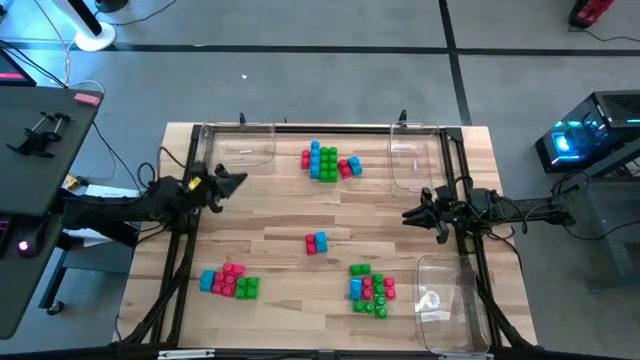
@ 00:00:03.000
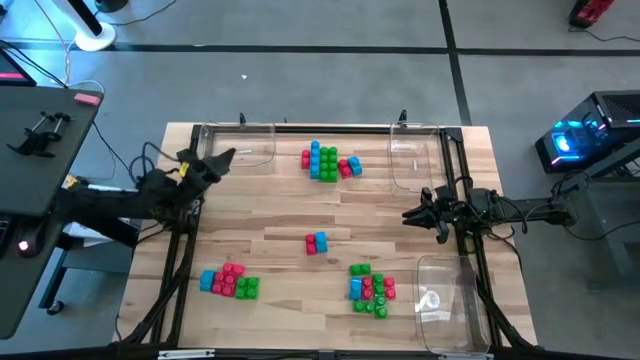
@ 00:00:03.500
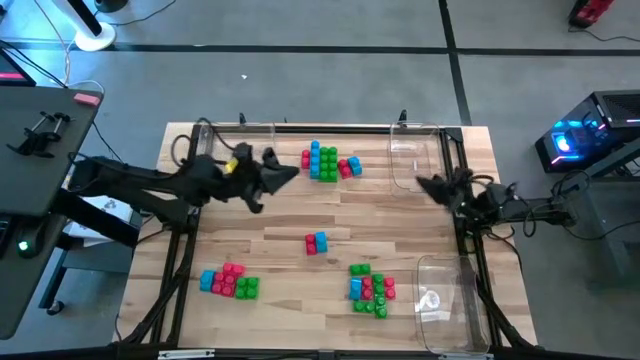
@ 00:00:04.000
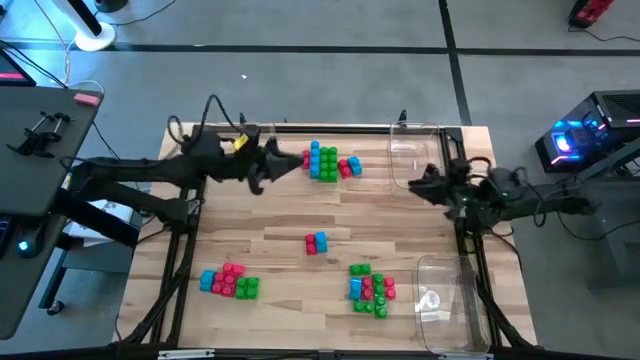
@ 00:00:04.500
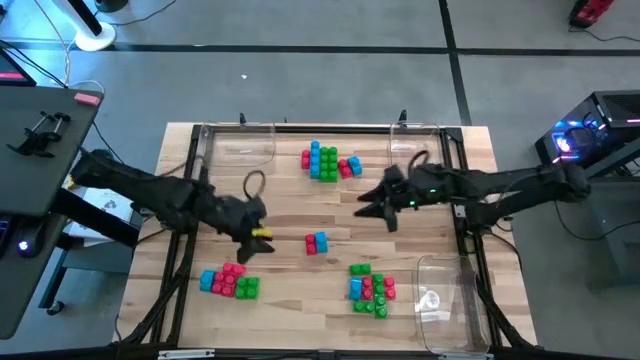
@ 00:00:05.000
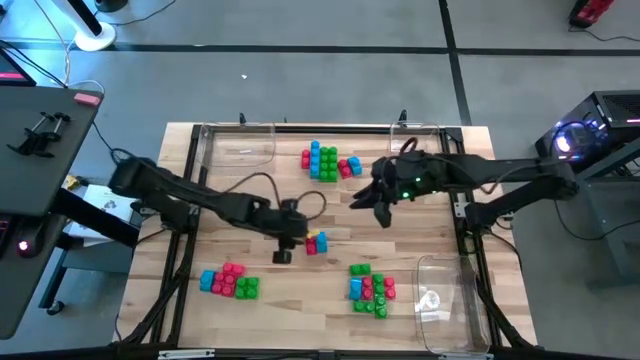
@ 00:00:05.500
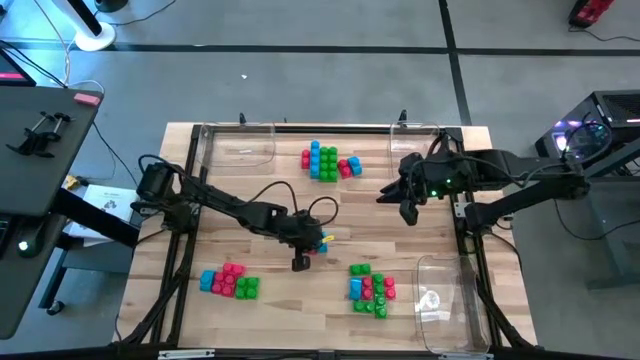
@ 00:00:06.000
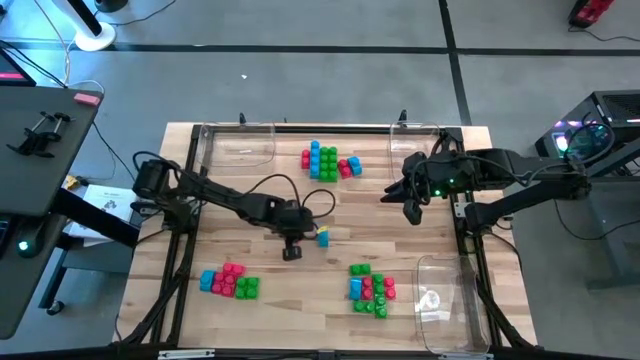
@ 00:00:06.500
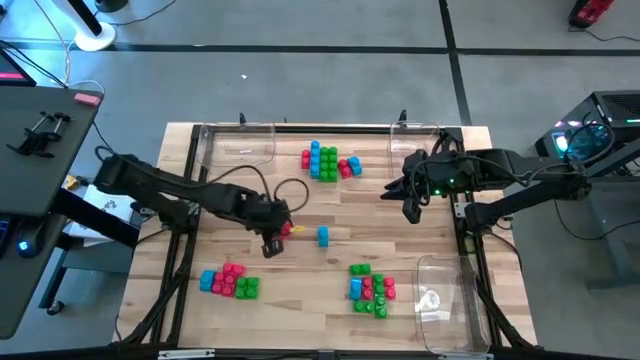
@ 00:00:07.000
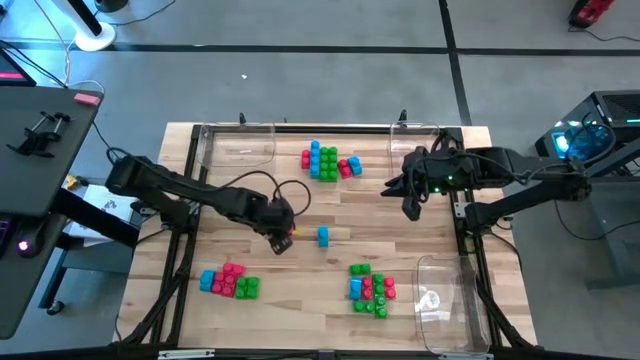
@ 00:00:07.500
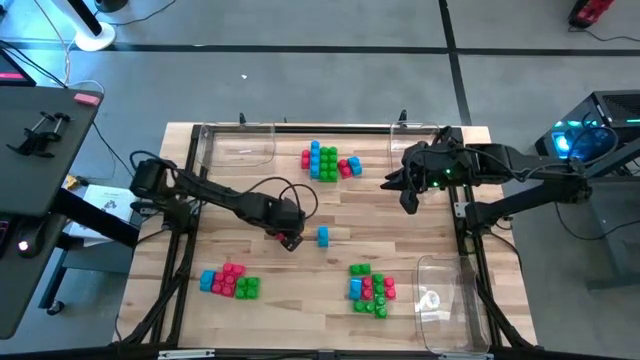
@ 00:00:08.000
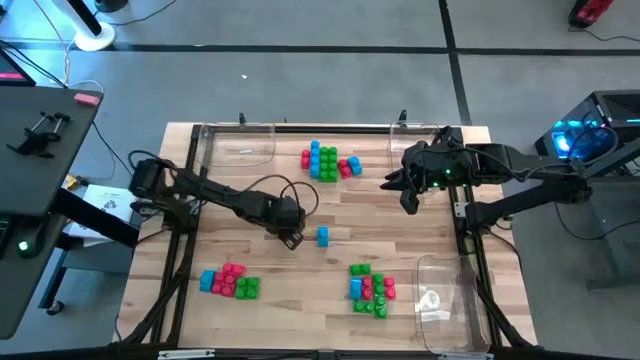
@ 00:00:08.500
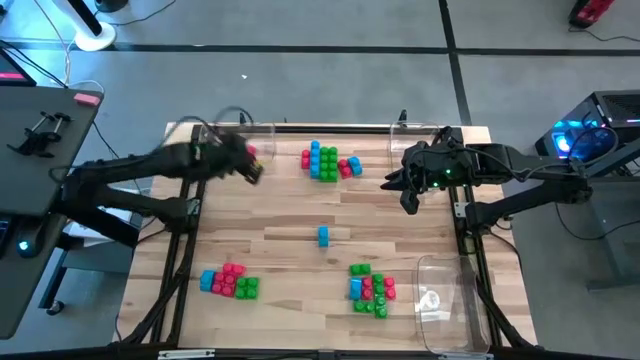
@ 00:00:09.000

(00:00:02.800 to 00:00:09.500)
Task: Sort blocks
Put the red game piece into the top left transparent bin

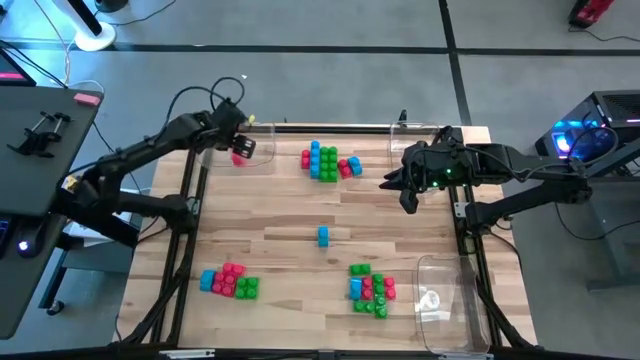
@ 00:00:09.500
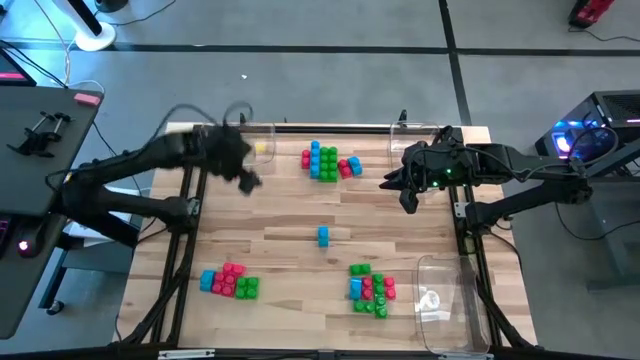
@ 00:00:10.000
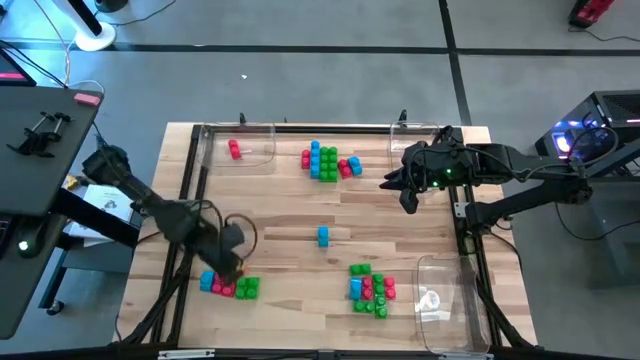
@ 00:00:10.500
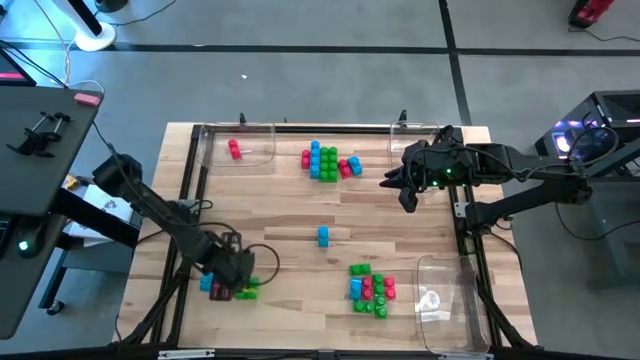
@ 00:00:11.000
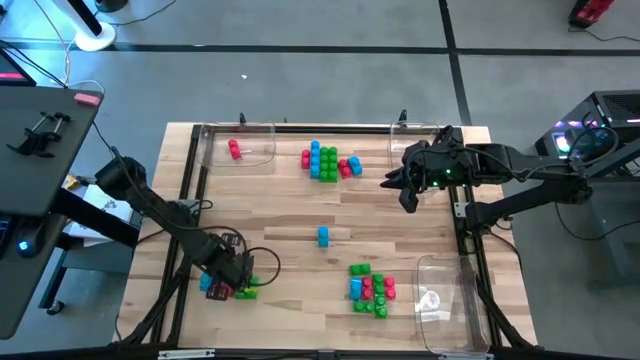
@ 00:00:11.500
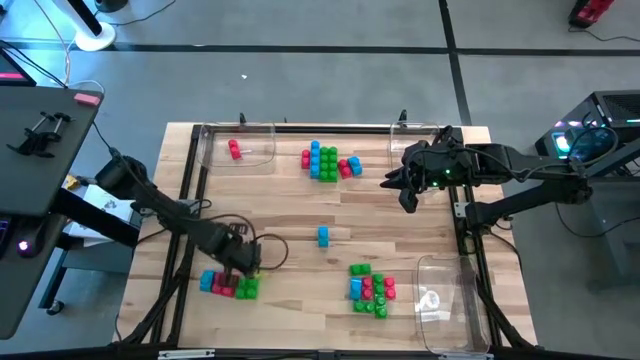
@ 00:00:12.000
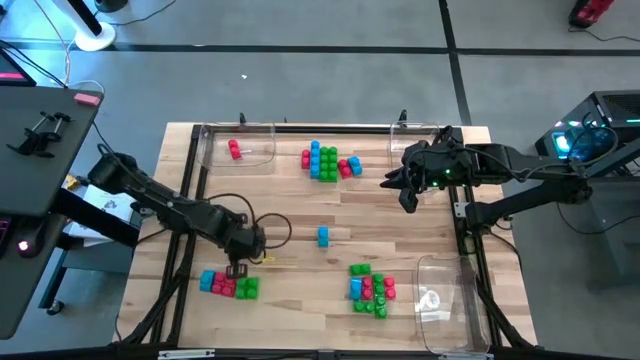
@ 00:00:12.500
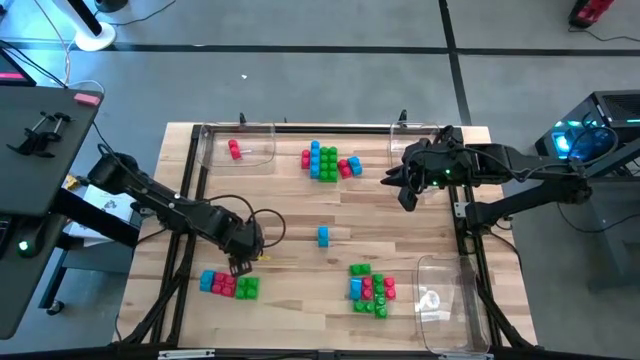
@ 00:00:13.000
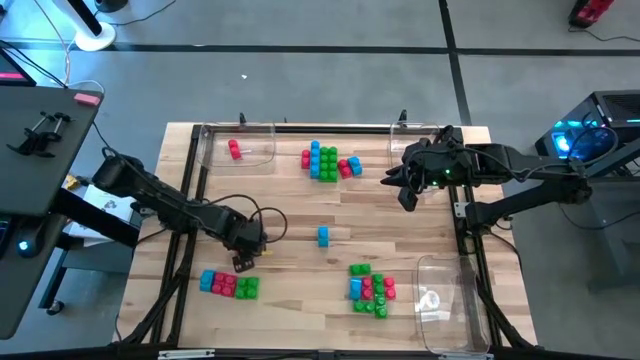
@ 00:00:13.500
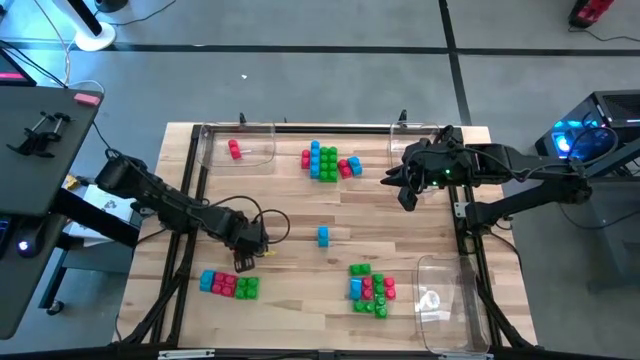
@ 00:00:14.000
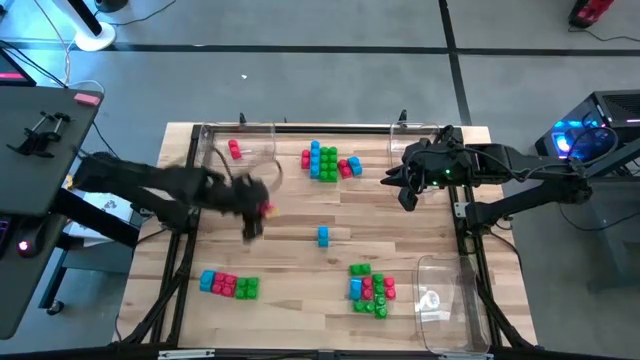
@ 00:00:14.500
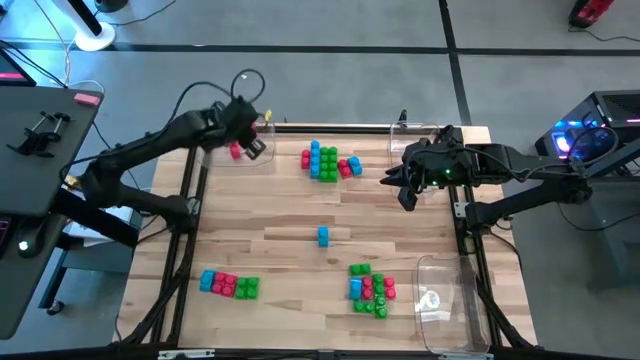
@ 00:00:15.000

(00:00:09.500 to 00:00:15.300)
Put the red game piece into the top left transparent bin

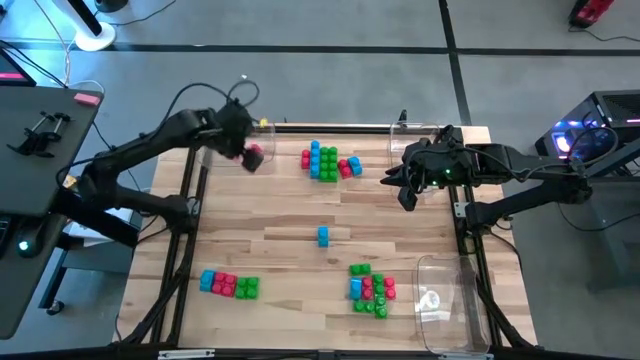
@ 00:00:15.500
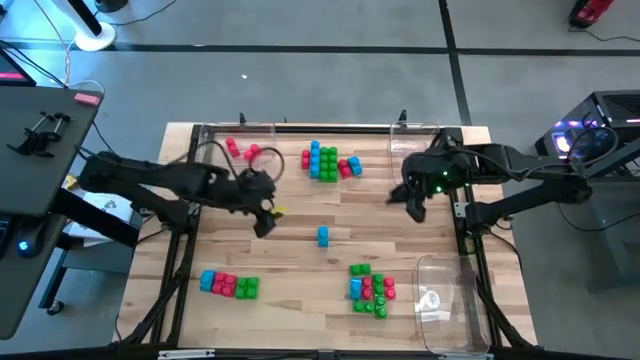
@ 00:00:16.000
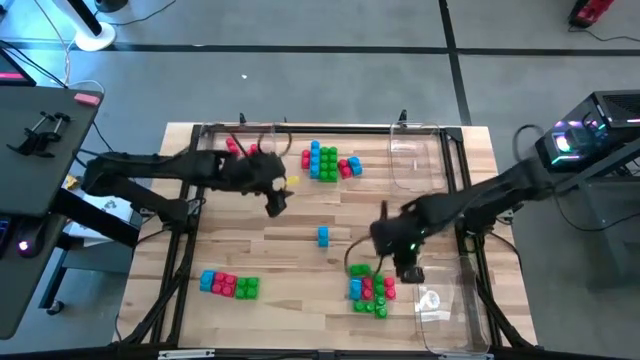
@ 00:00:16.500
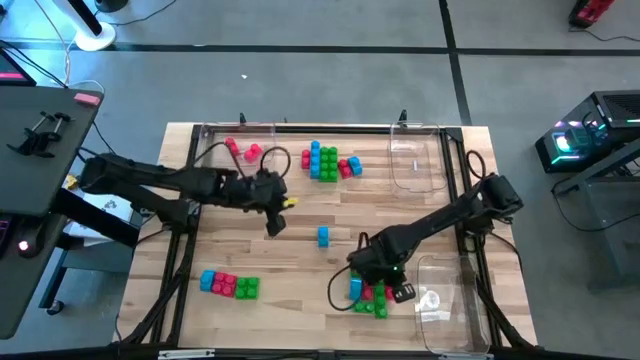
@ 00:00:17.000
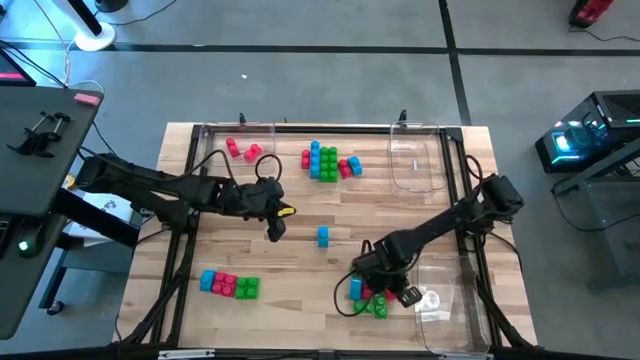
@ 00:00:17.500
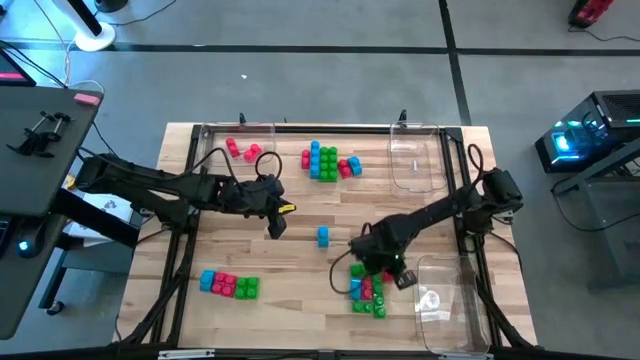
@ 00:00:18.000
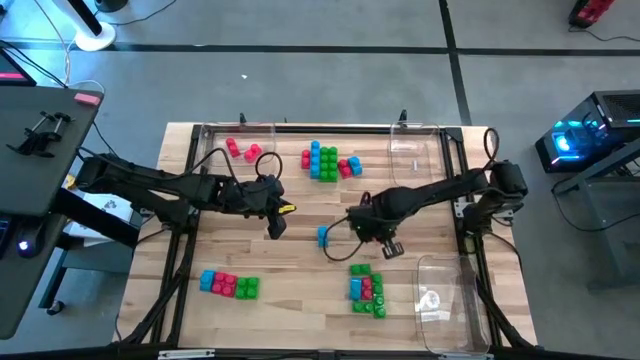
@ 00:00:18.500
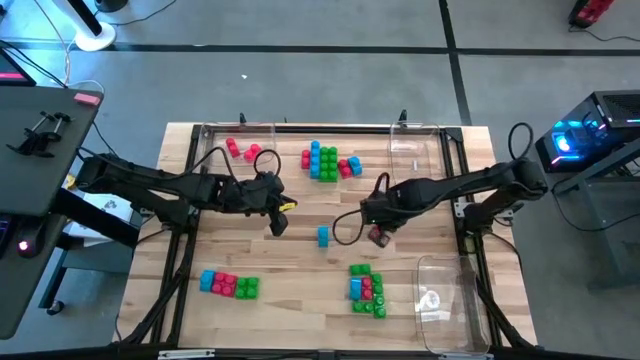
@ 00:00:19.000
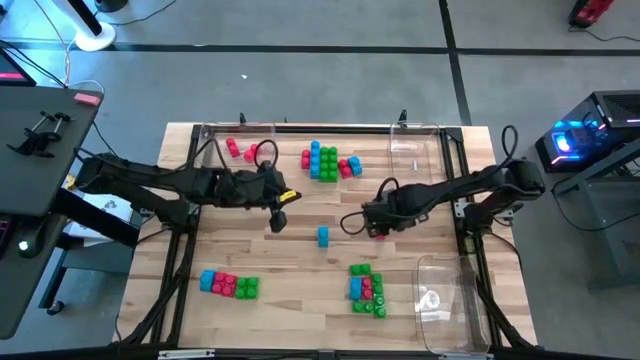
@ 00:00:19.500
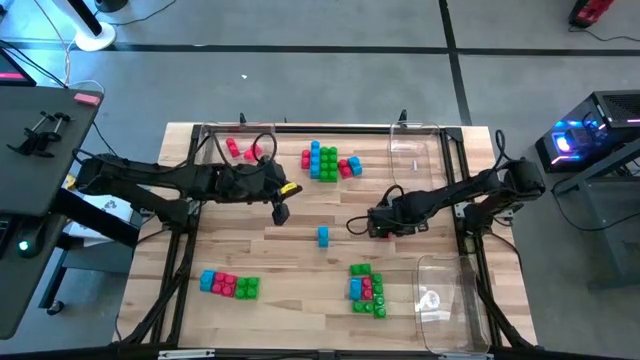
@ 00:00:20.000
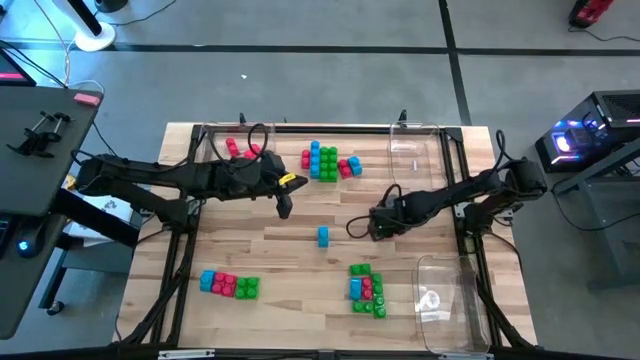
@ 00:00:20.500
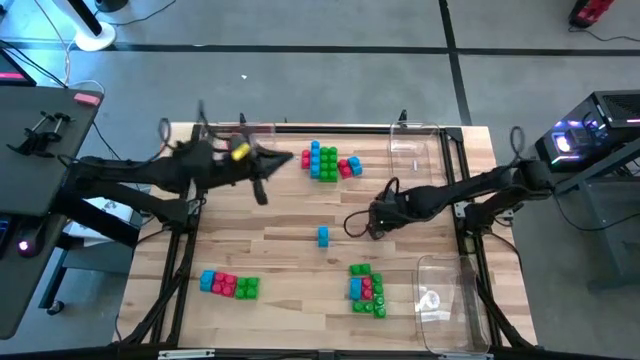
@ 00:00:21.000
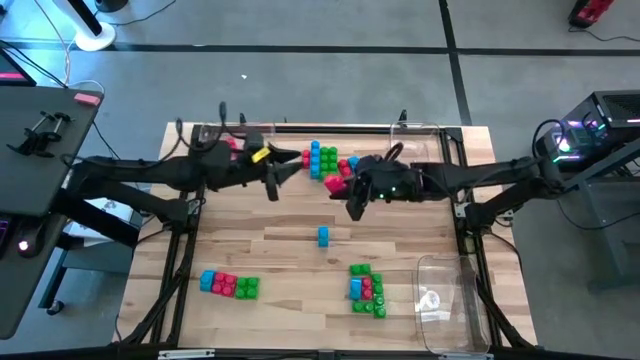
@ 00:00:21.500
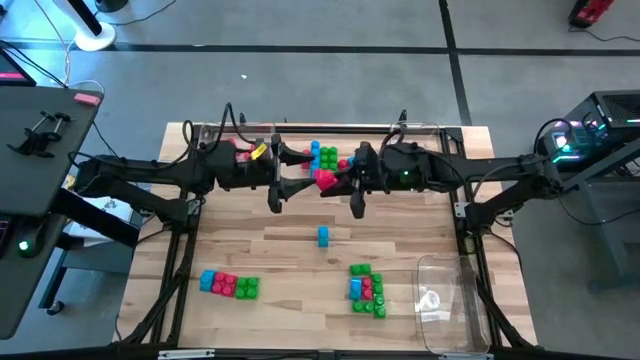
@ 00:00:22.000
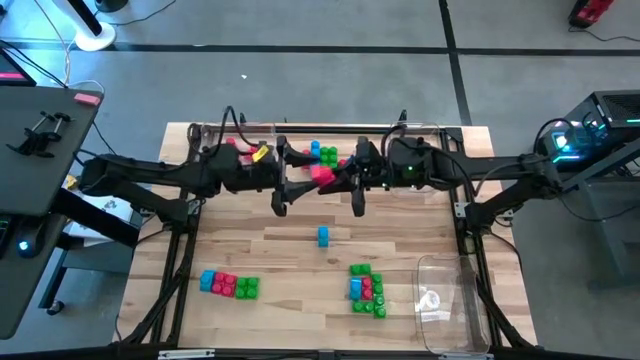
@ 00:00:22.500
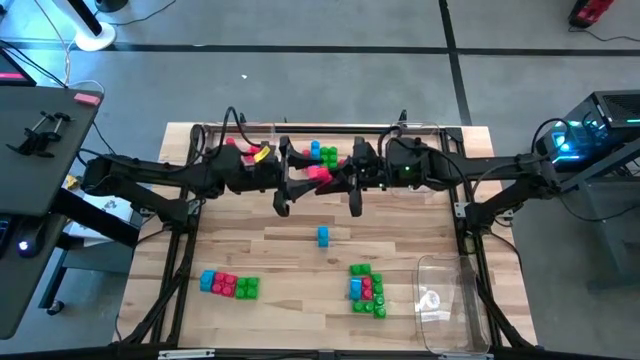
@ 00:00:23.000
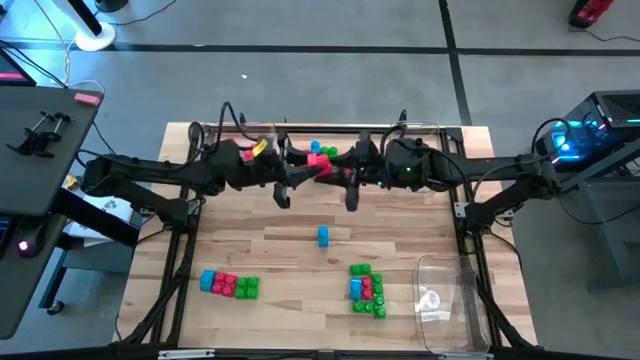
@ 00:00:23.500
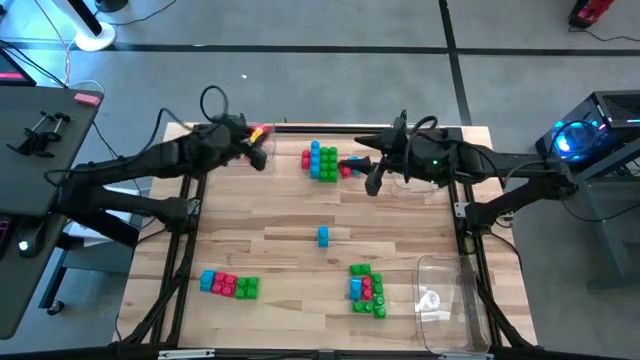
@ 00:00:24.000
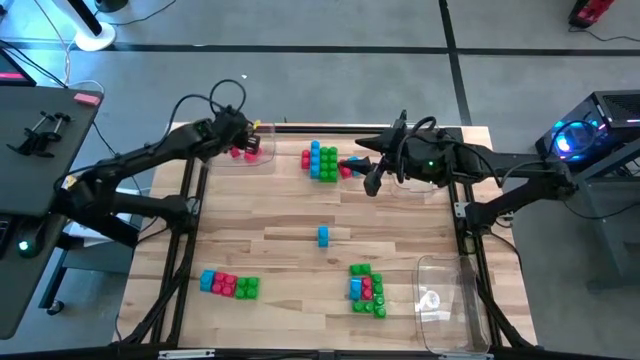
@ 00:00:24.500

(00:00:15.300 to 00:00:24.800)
Put the red game piece into the top left transparent bin
